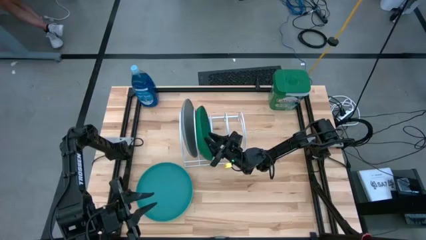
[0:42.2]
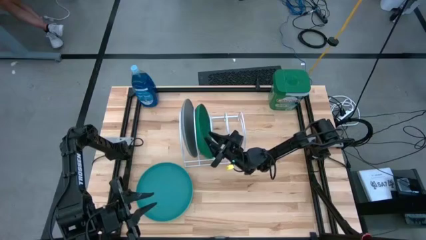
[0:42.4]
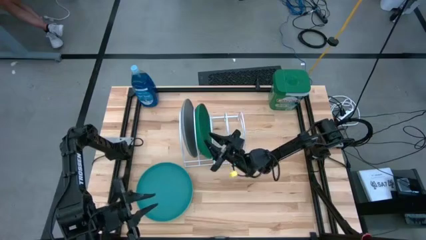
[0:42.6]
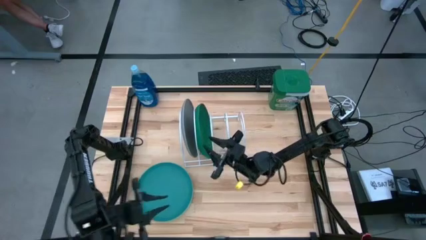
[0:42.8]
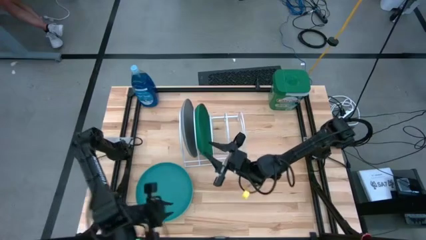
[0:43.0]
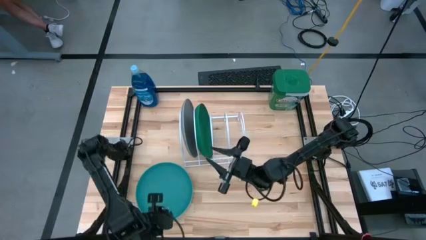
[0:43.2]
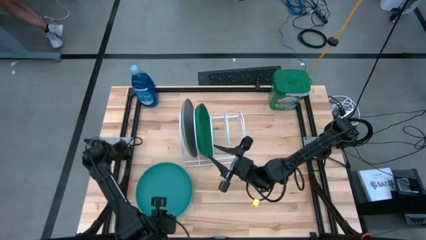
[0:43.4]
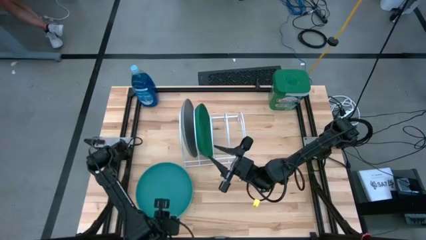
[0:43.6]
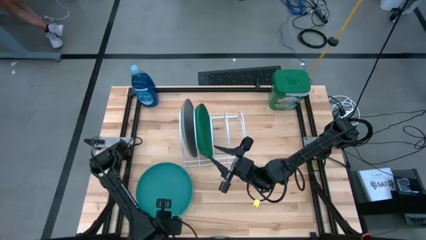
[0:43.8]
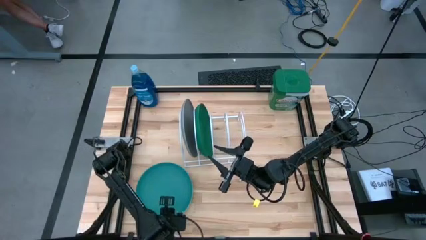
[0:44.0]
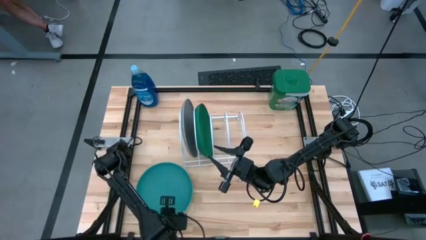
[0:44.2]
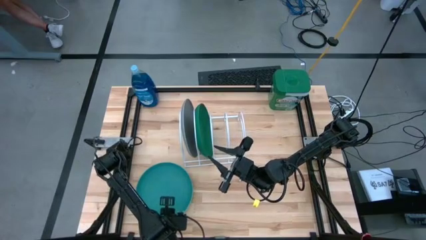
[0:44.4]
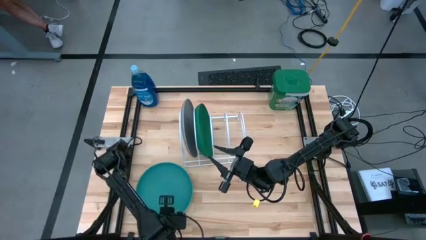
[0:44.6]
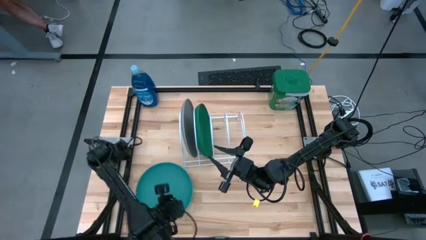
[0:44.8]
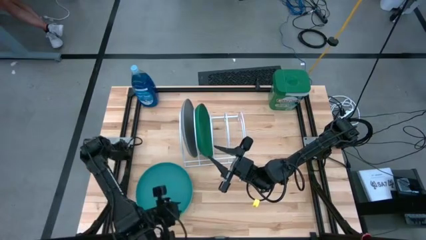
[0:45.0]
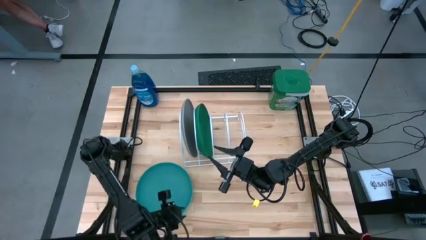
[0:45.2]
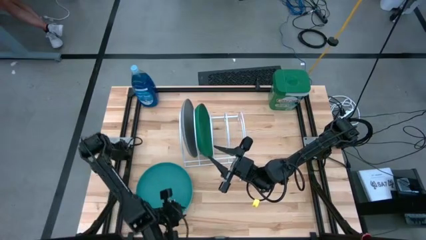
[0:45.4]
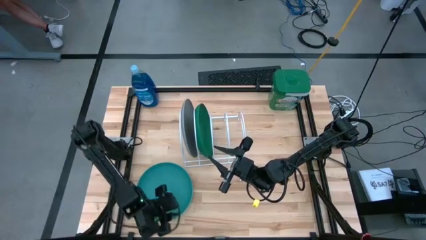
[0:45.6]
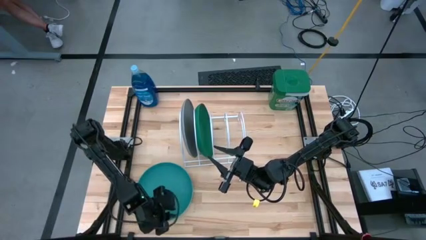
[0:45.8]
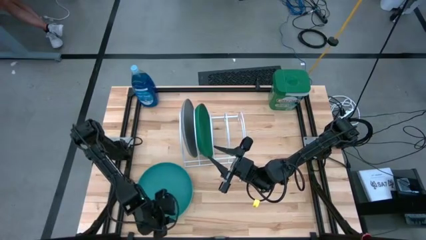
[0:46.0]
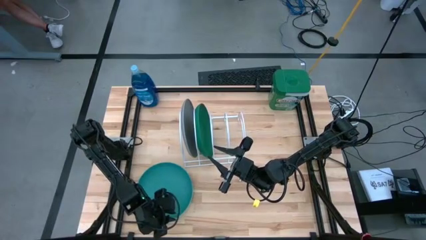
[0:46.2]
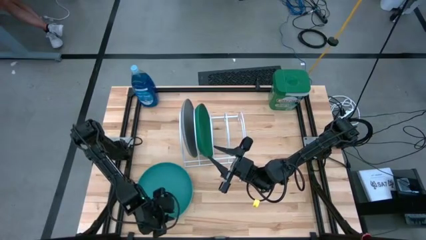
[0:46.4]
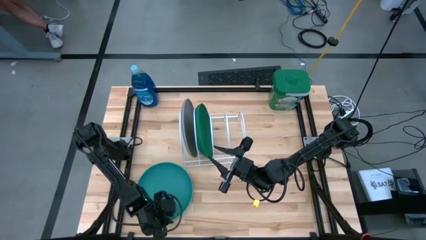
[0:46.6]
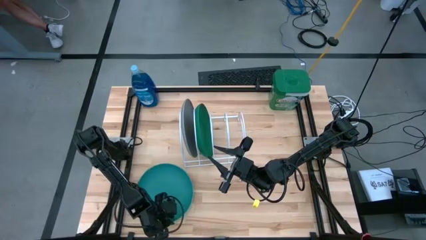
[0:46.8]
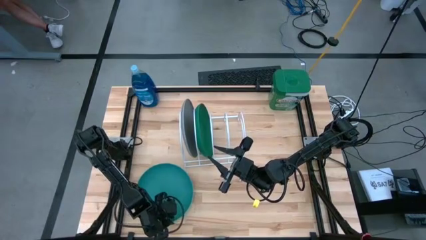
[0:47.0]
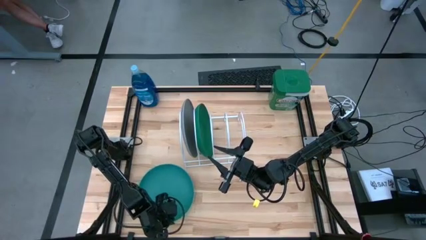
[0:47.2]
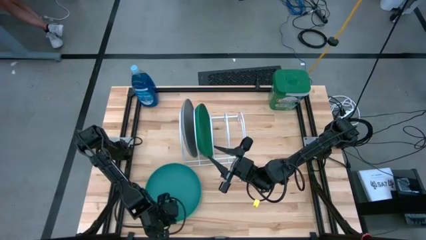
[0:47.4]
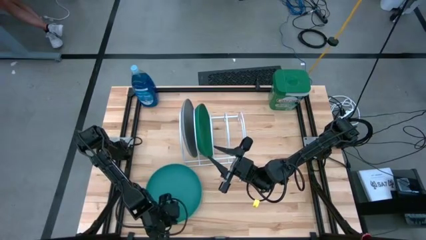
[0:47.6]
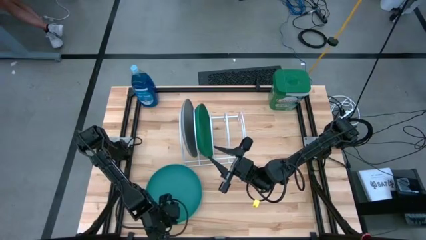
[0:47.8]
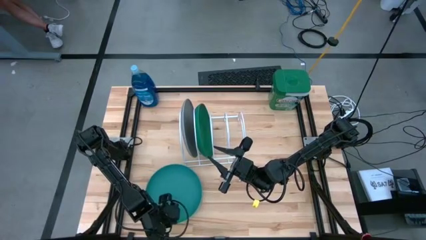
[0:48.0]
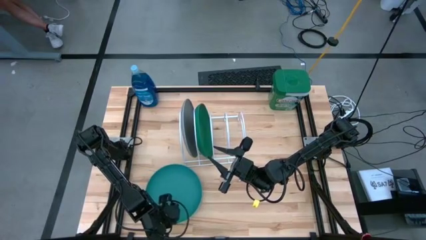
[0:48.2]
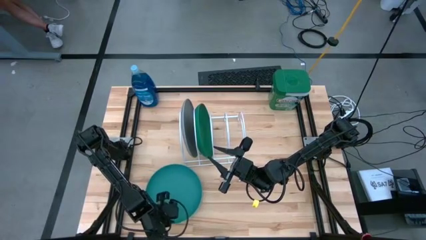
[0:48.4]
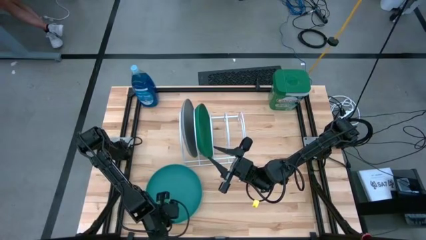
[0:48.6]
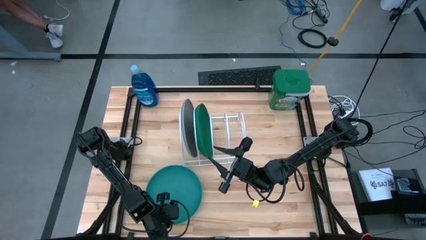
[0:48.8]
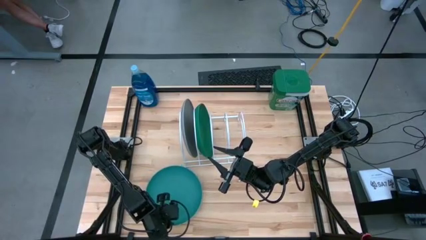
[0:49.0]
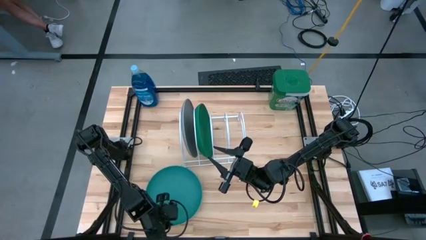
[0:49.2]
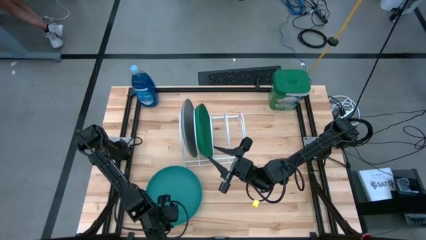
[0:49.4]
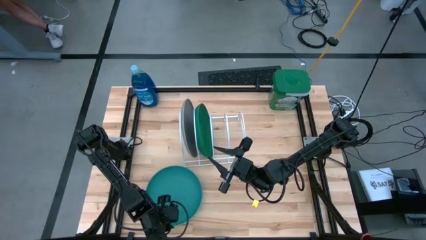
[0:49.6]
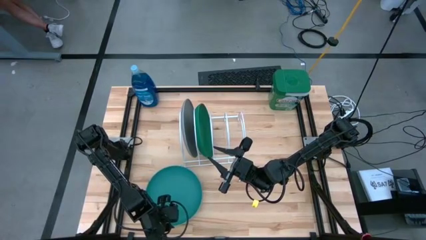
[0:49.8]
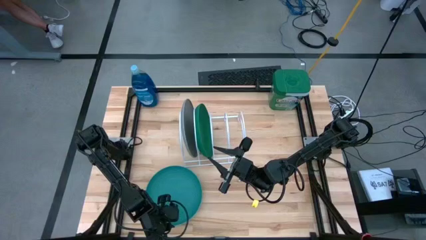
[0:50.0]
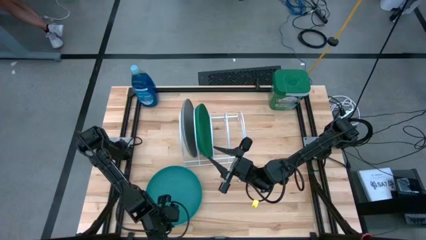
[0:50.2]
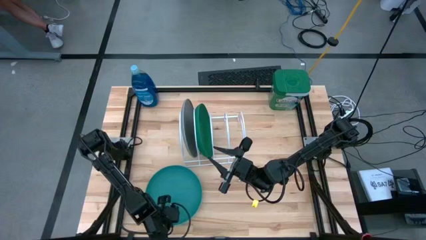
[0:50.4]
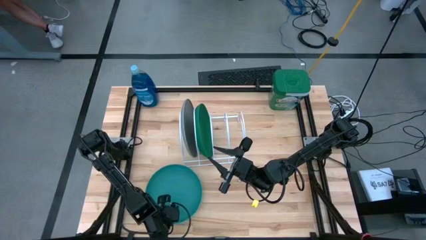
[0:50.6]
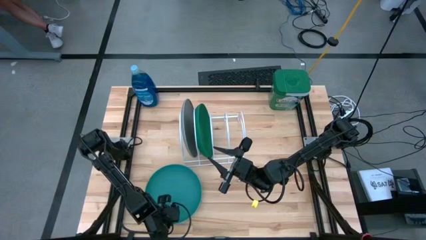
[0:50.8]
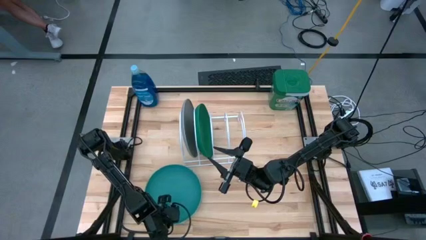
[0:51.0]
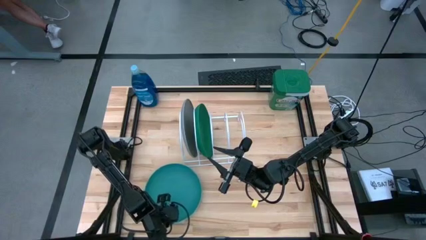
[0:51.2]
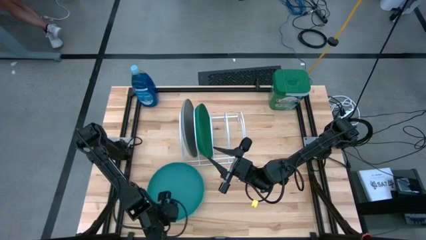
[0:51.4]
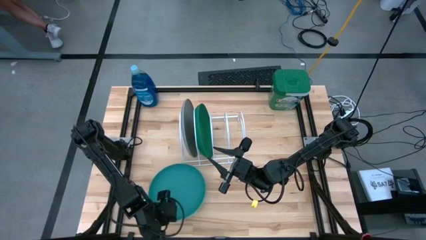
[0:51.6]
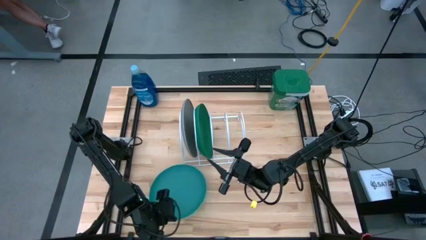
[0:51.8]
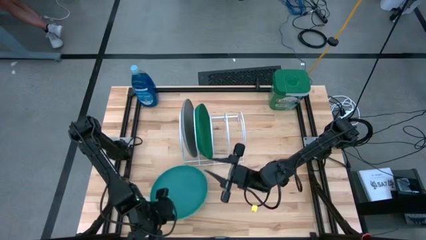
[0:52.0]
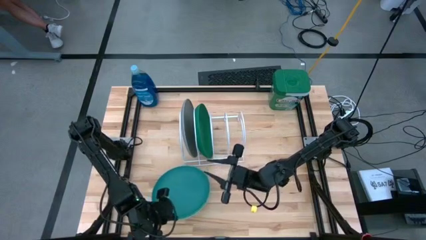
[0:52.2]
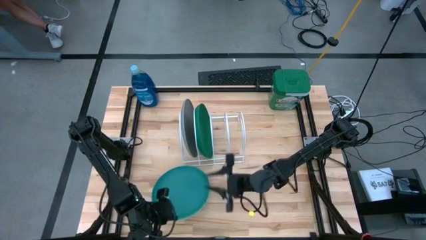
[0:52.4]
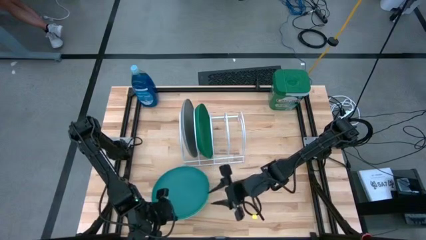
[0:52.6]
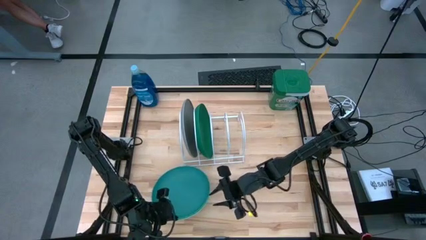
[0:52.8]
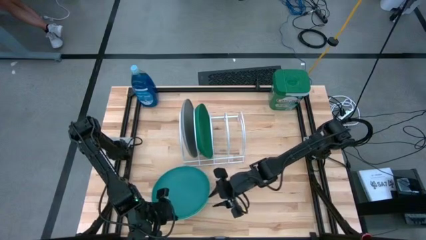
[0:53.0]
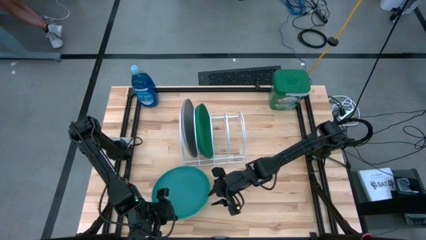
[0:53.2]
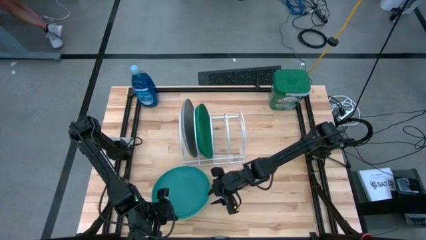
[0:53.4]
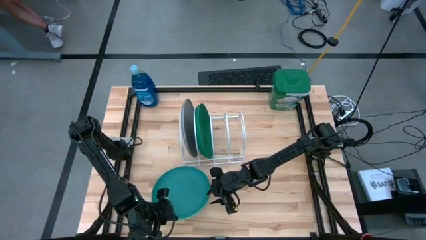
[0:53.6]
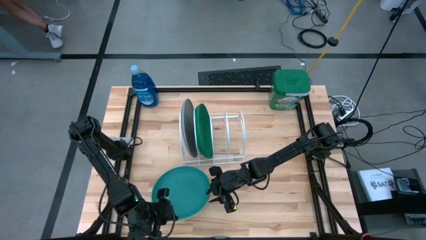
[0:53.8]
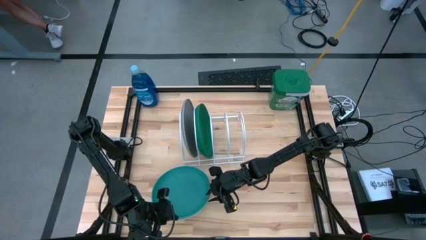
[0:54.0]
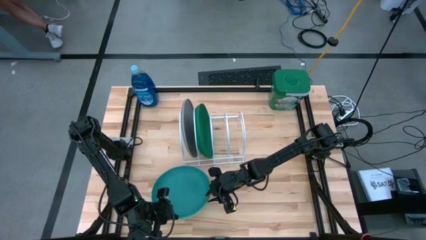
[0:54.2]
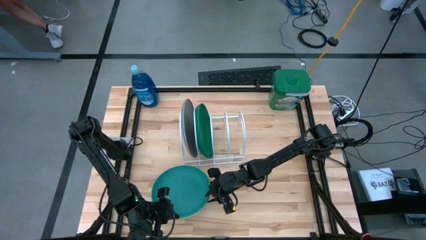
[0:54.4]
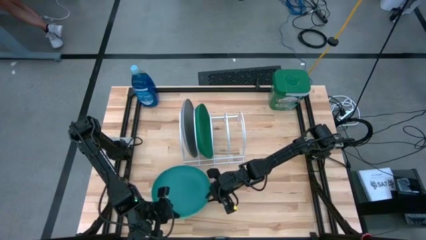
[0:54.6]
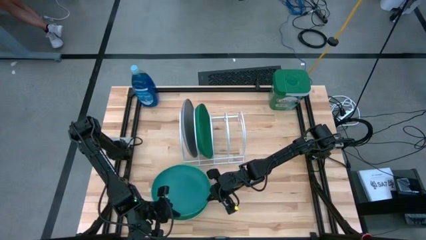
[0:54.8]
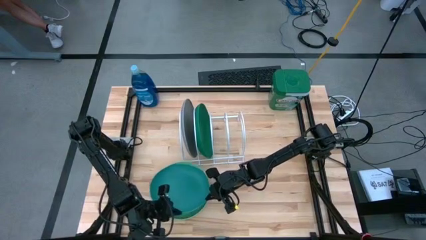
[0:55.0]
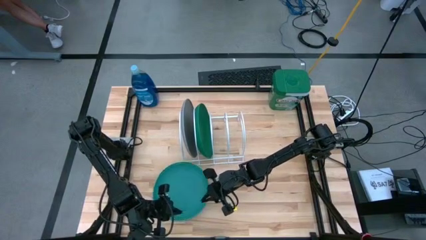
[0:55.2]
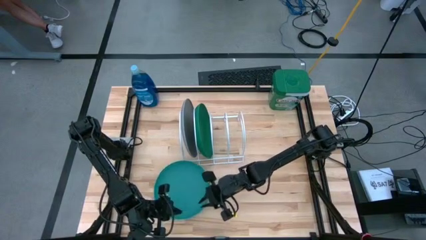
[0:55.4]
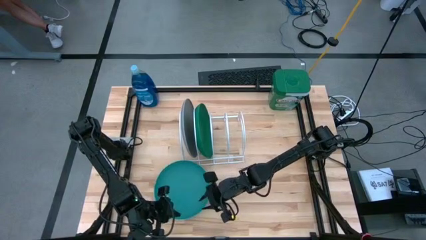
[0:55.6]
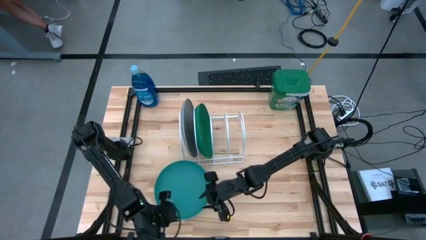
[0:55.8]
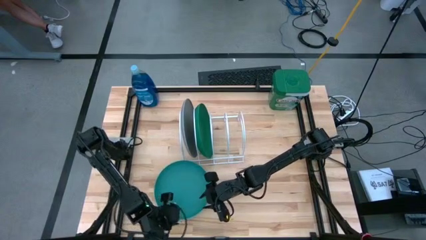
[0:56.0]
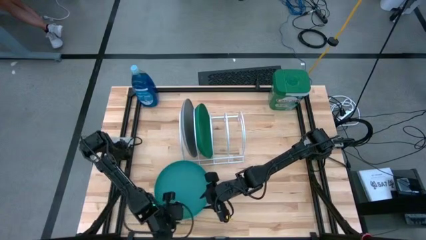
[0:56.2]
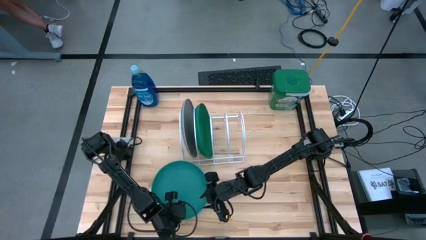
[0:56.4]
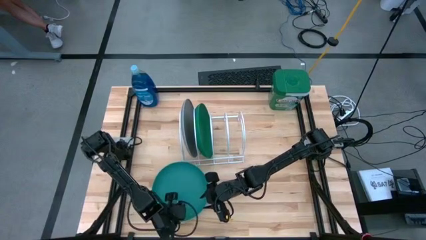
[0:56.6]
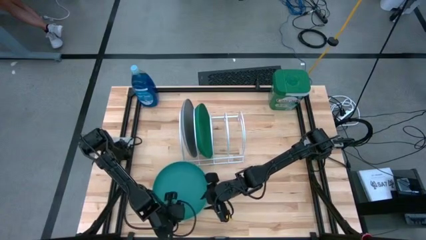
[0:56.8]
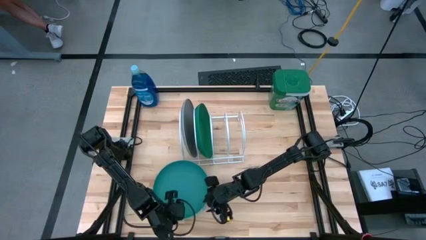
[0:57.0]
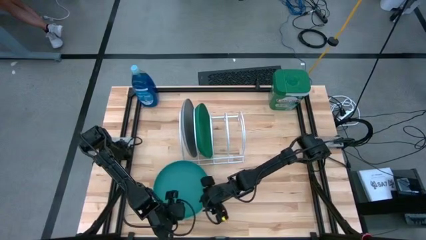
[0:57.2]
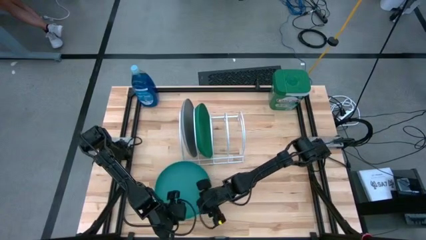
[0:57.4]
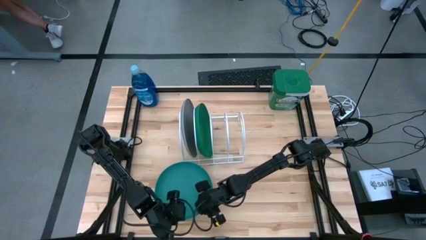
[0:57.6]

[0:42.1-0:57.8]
Task: Sort dishes
Put the blue plate into the dish rack
